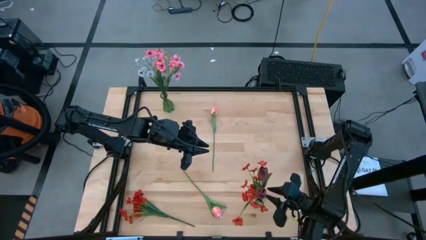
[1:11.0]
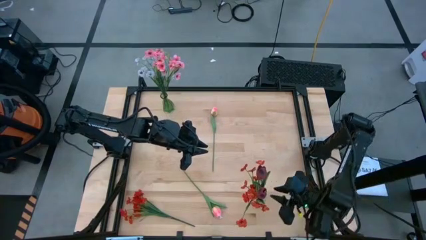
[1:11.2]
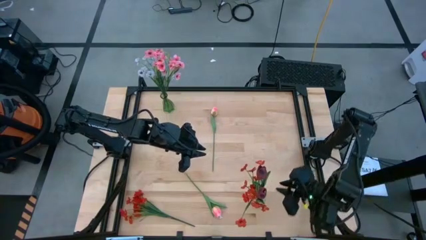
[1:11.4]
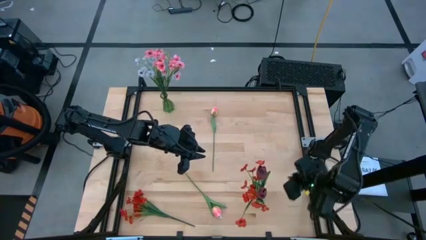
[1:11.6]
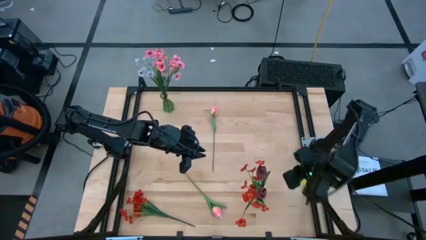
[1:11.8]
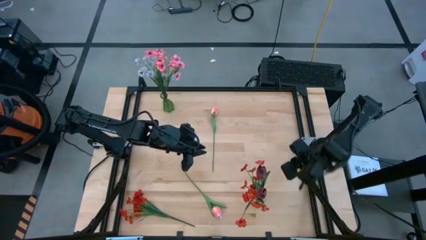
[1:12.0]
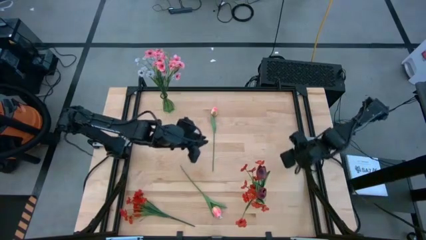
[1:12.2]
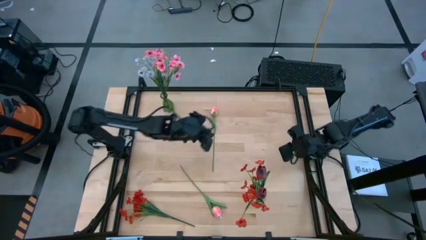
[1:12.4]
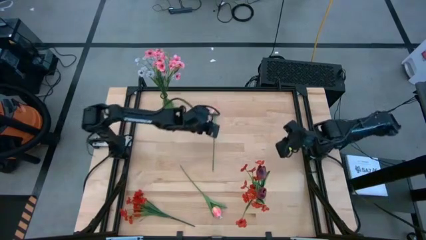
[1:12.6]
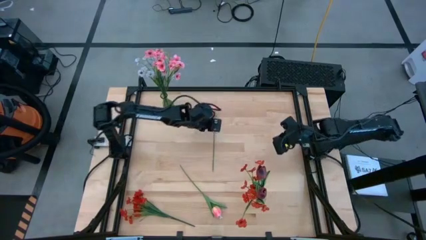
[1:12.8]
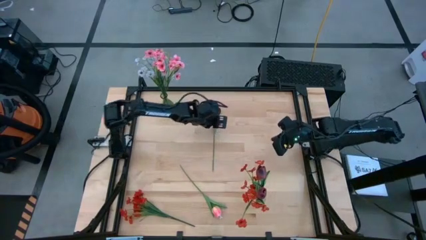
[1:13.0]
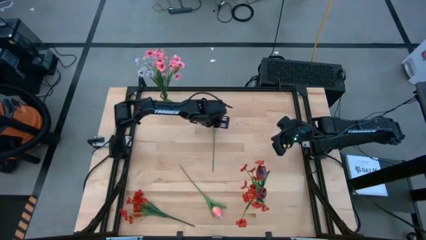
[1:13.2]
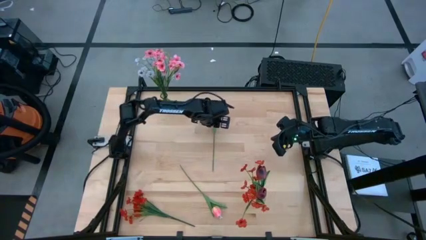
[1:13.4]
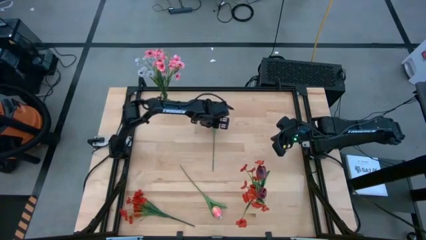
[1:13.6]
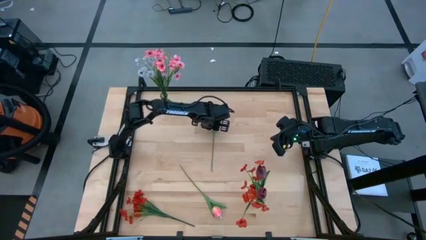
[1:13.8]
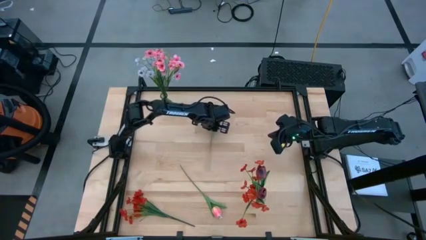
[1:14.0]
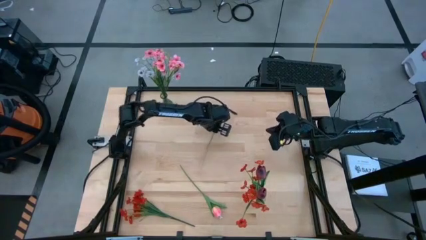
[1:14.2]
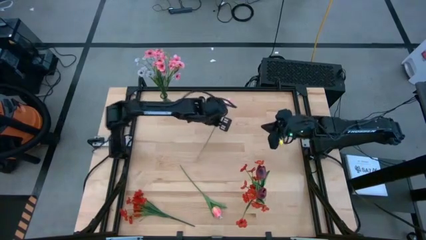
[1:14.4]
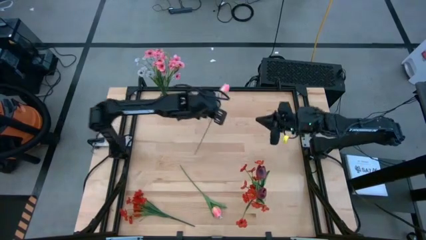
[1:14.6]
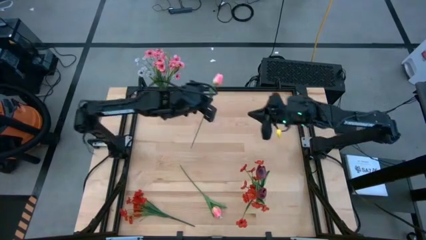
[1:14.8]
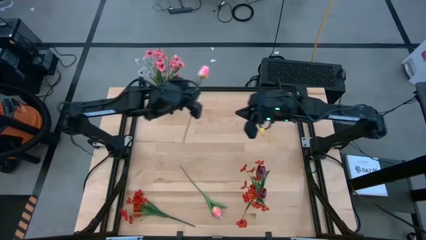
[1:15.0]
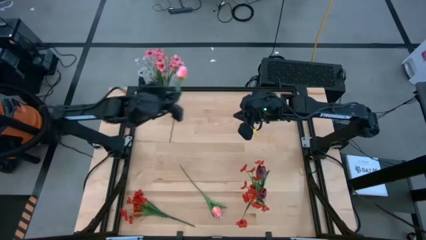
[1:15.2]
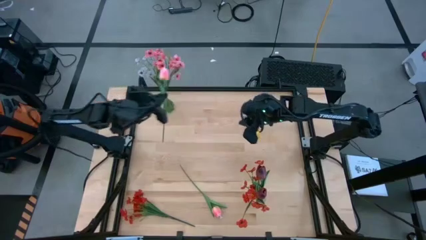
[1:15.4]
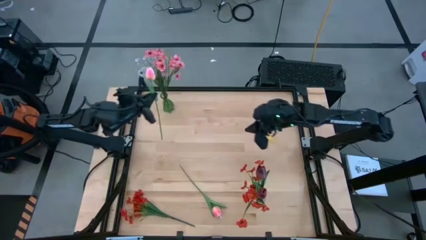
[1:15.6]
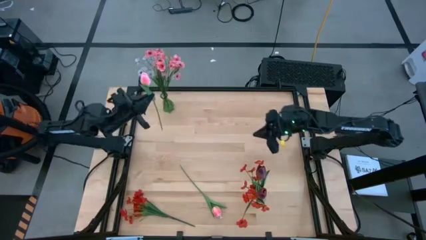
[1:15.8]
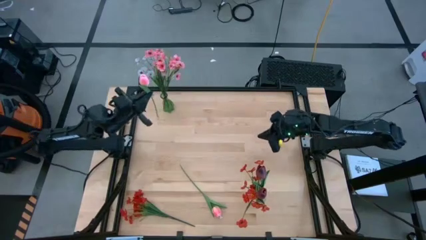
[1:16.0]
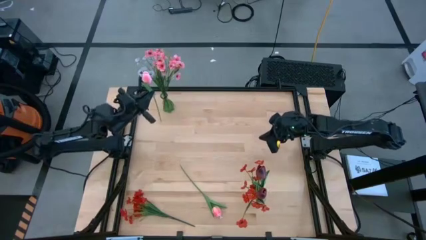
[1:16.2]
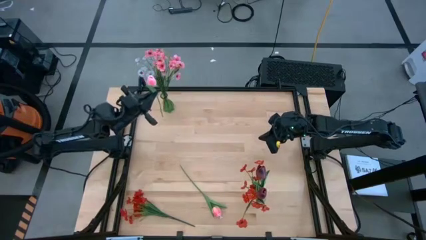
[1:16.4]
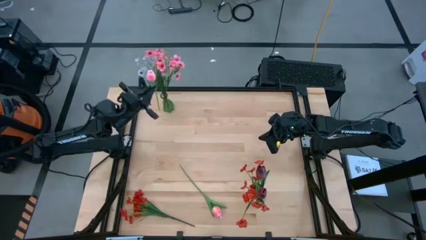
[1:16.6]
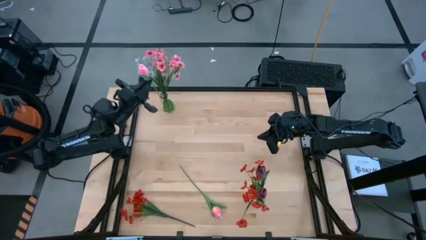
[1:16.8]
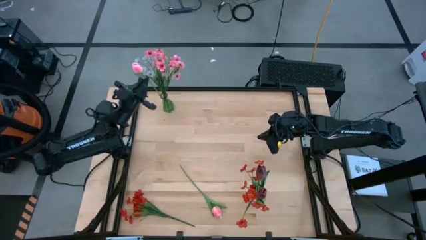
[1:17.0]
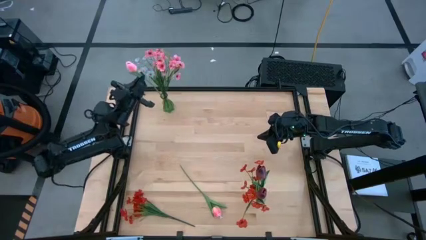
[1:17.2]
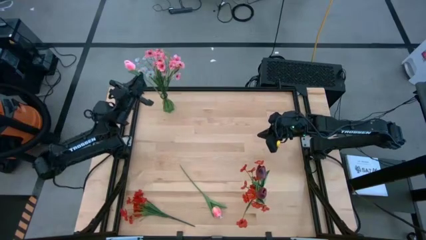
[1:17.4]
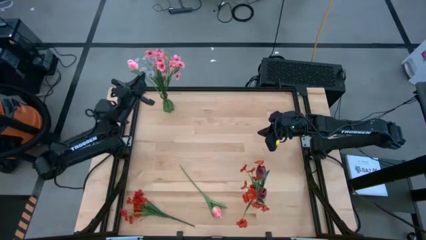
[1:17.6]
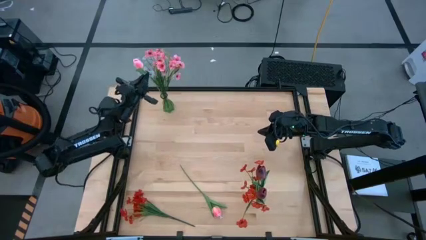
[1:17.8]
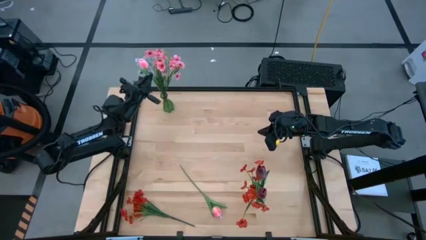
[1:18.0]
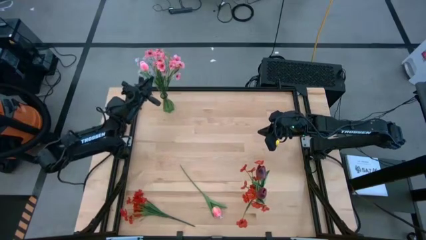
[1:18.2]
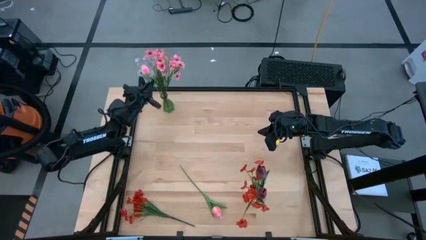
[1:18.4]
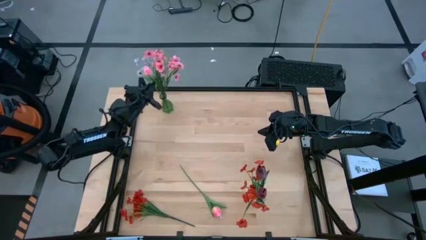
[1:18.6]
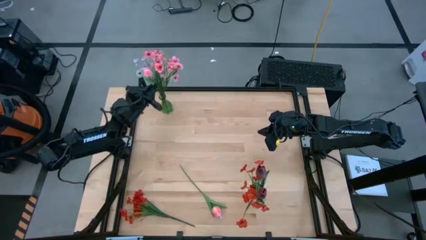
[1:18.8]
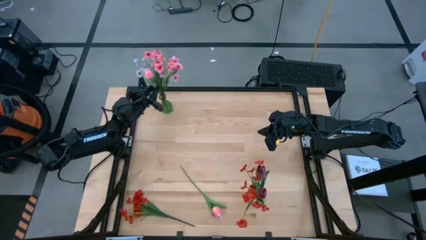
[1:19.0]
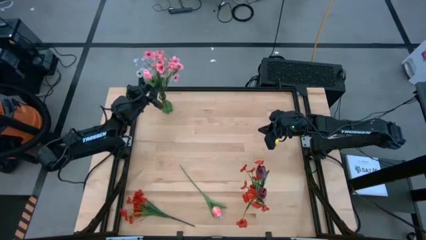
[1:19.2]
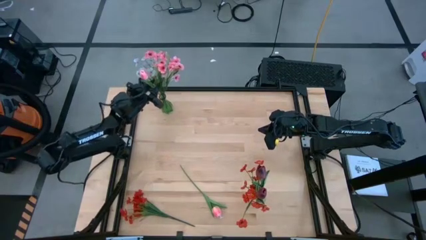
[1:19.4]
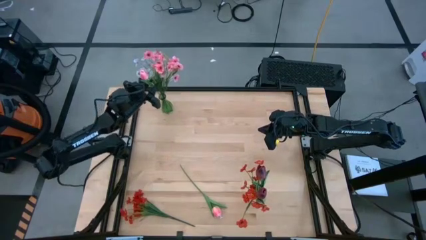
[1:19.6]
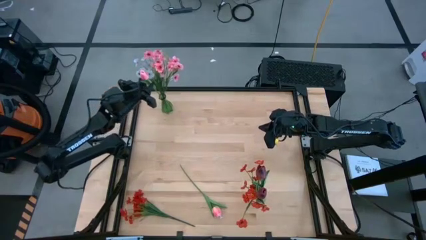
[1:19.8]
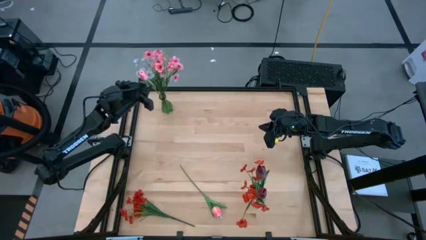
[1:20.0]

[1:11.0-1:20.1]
Task: Sort flowers into vase by color
Put the top pink tulip into the green vase

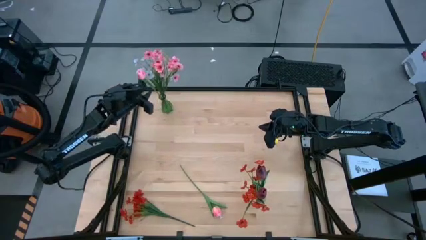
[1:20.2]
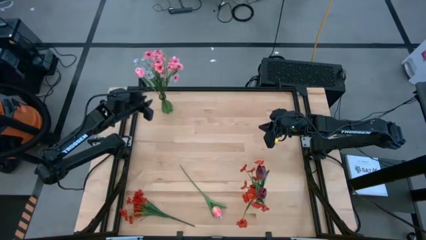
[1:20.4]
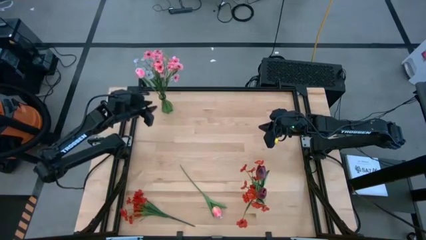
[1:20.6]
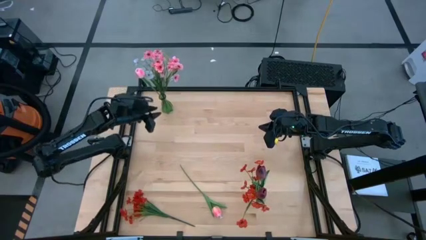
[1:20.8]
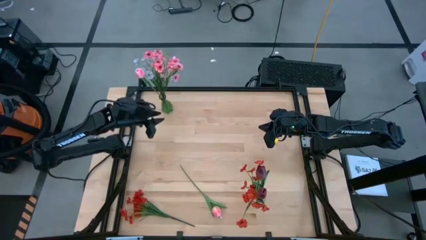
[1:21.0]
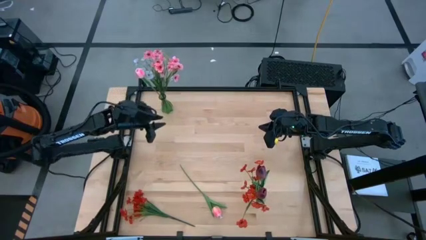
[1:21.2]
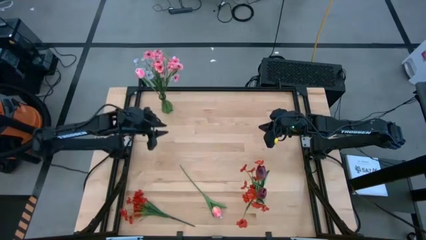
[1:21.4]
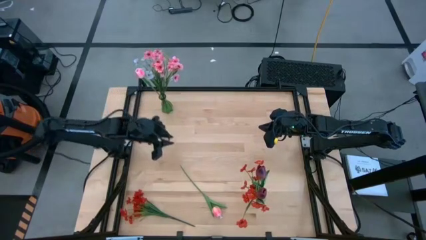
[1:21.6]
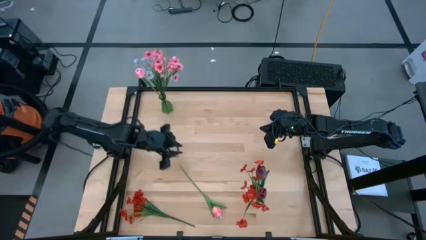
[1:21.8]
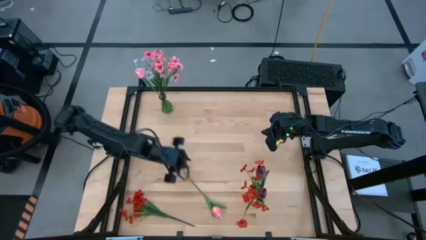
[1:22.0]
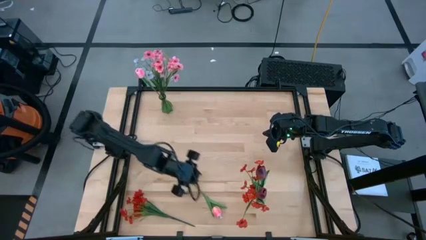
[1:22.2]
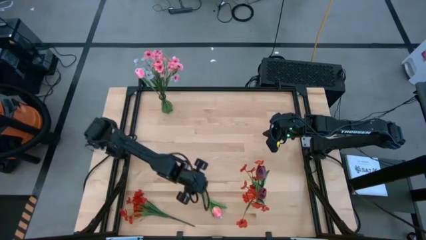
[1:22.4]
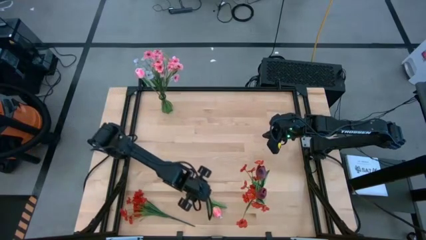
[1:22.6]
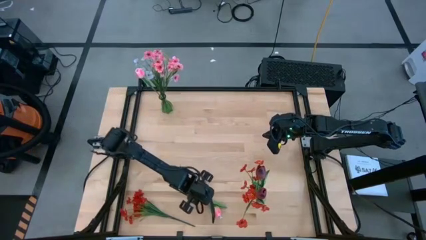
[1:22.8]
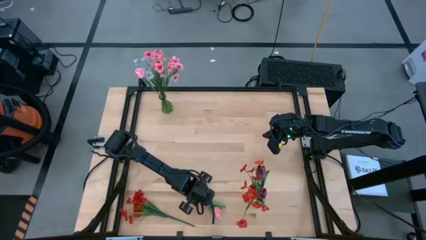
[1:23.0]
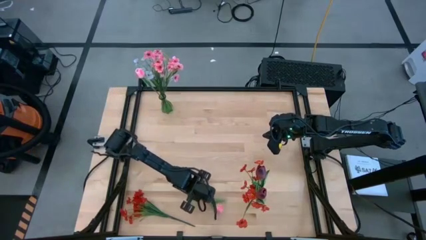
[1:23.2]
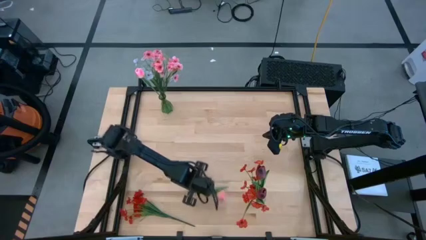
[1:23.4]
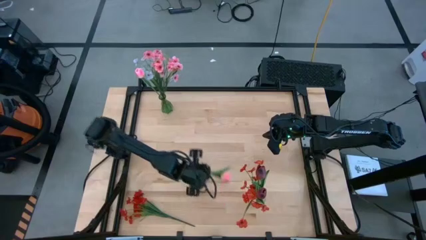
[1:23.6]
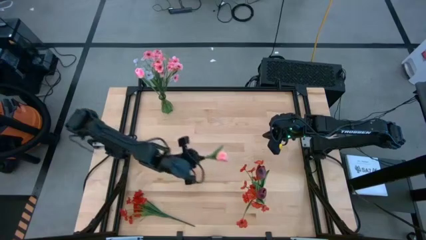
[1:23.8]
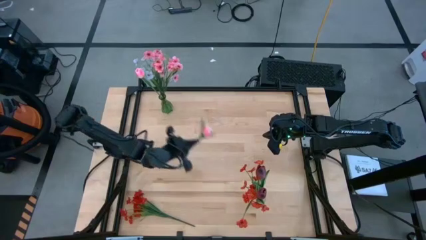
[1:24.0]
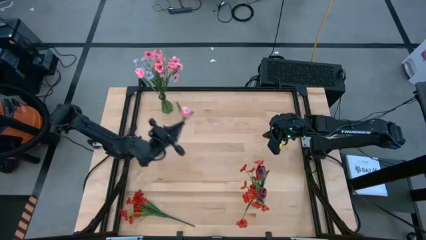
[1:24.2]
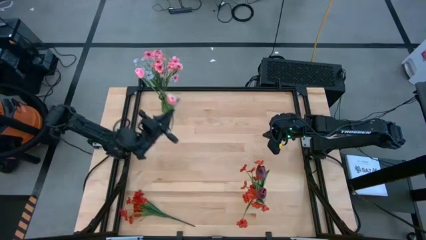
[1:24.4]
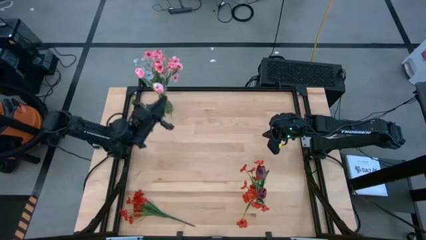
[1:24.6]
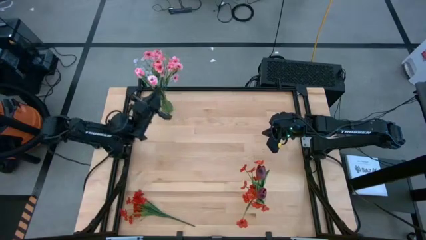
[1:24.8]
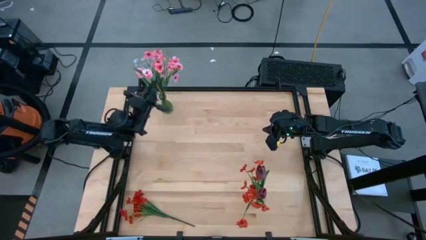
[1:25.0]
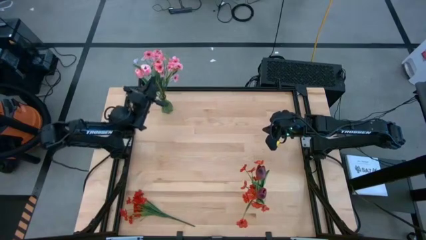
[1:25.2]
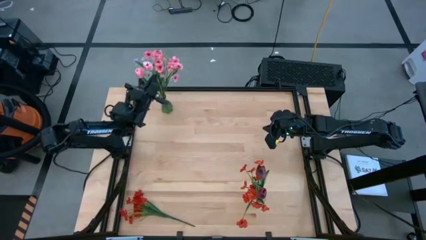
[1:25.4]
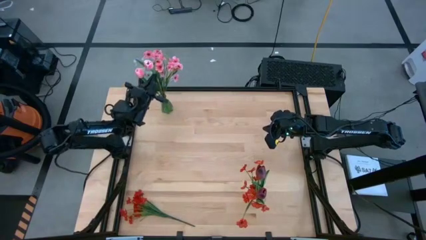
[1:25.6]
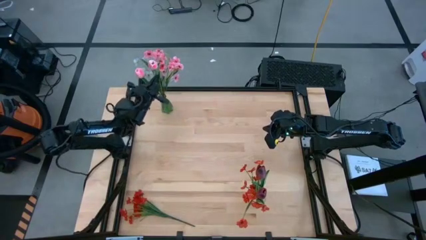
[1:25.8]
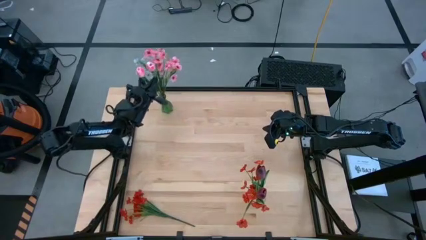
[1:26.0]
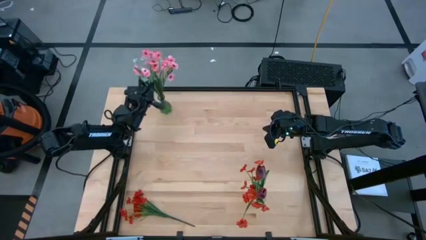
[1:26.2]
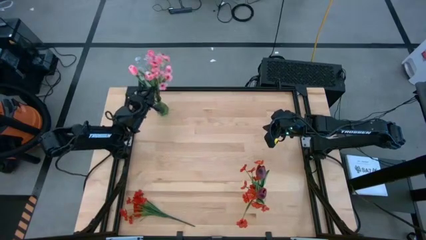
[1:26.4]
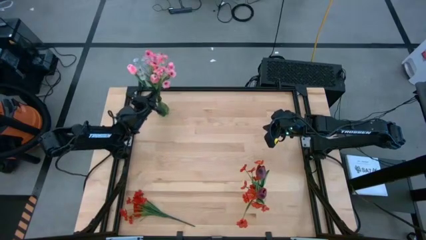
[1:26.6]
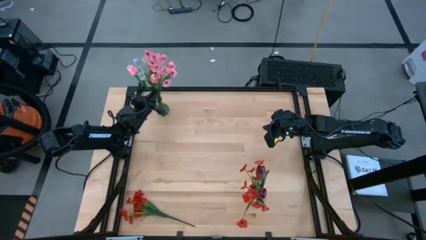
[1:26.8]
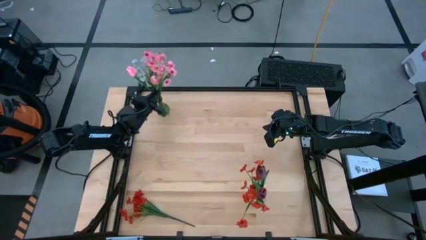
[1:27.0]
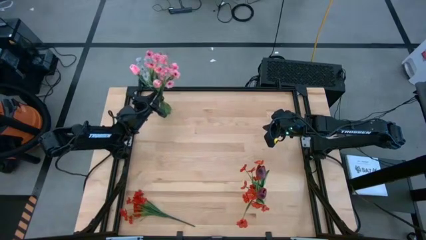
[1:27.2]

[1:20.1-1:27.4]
Put the pink tulip into the green vase
